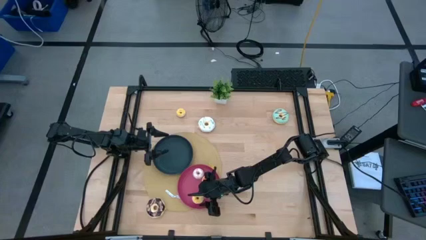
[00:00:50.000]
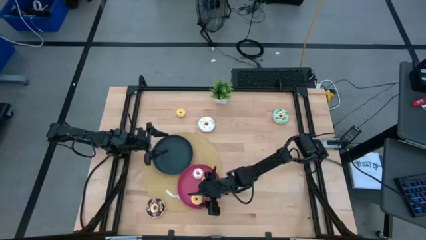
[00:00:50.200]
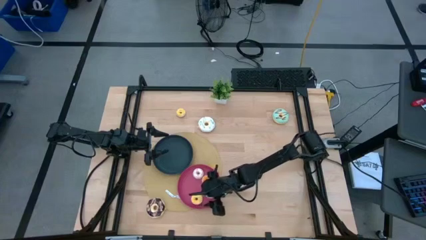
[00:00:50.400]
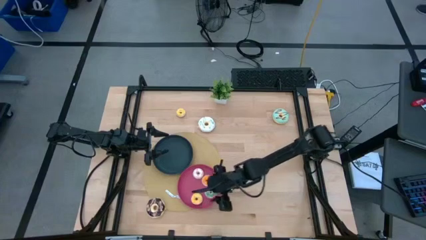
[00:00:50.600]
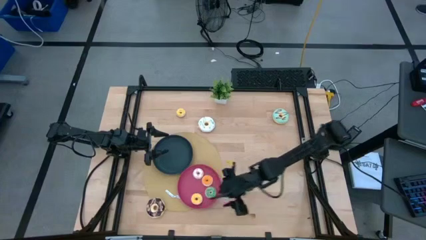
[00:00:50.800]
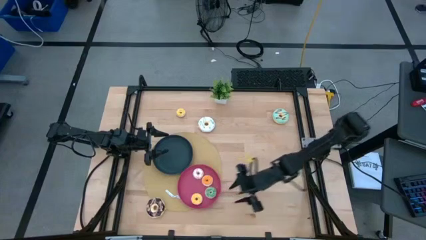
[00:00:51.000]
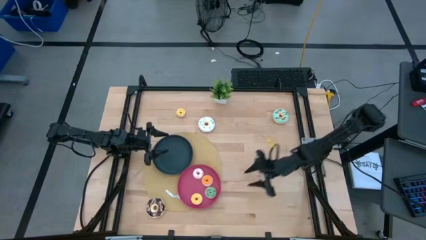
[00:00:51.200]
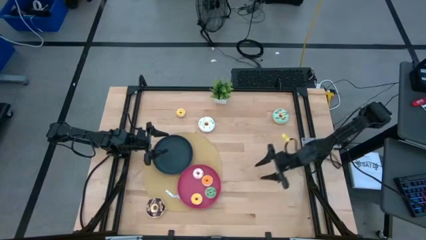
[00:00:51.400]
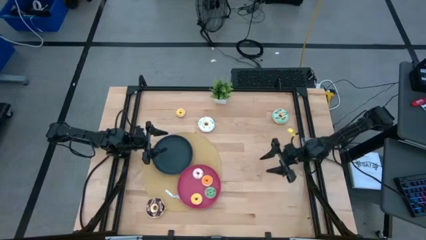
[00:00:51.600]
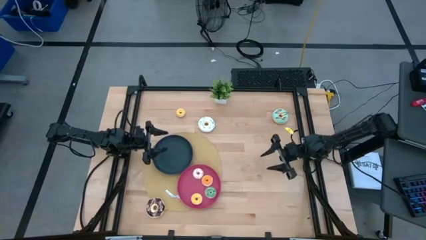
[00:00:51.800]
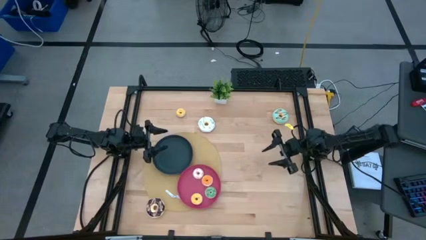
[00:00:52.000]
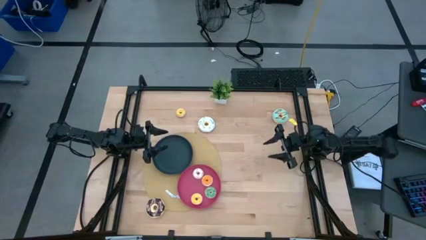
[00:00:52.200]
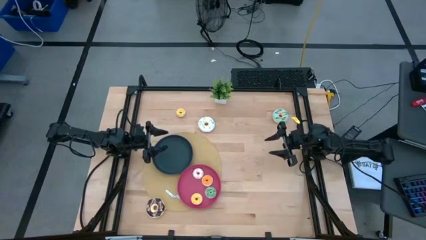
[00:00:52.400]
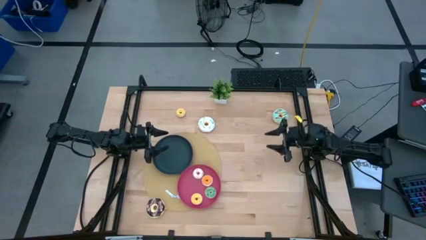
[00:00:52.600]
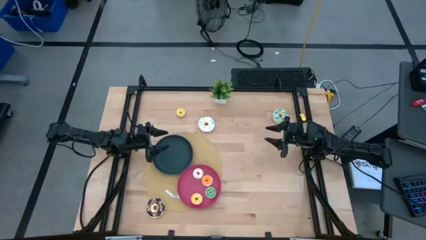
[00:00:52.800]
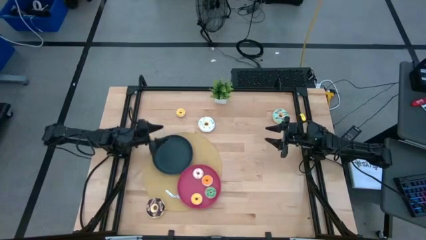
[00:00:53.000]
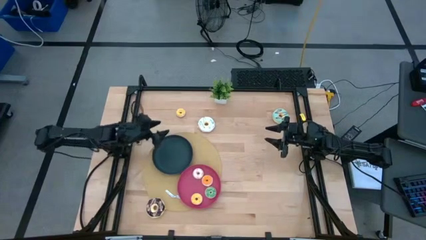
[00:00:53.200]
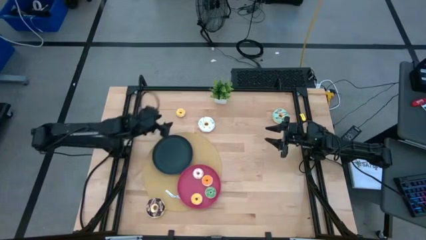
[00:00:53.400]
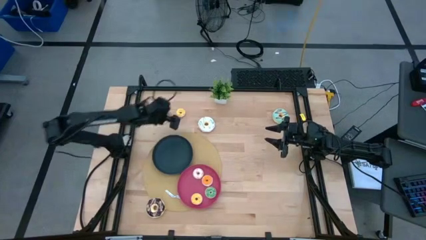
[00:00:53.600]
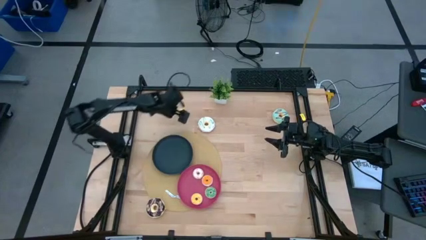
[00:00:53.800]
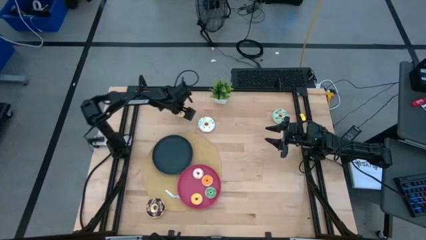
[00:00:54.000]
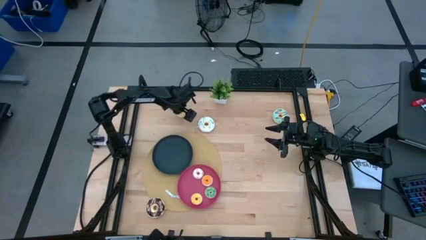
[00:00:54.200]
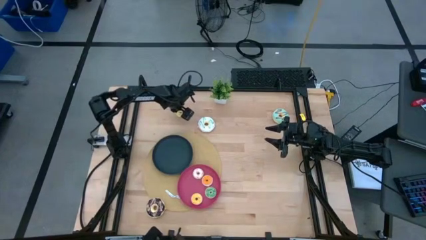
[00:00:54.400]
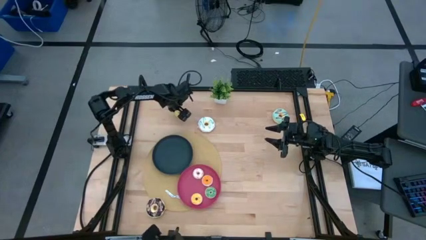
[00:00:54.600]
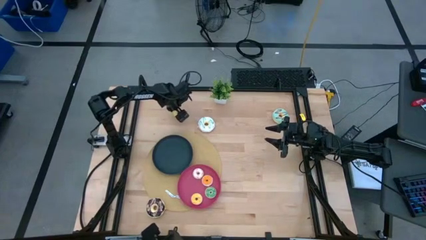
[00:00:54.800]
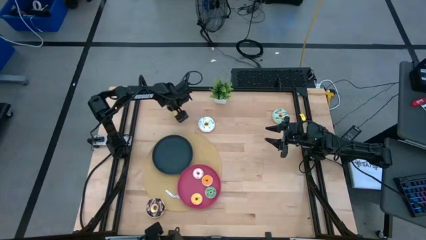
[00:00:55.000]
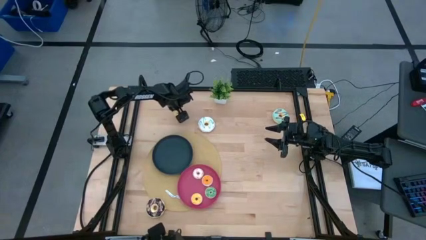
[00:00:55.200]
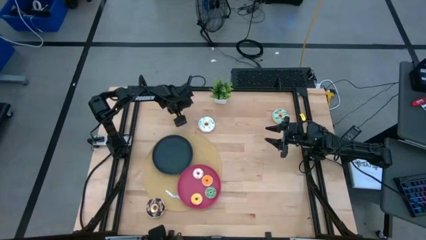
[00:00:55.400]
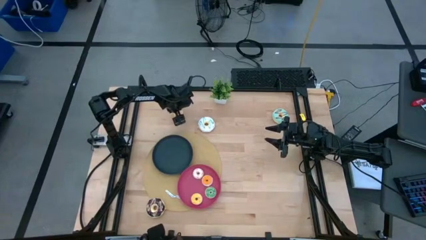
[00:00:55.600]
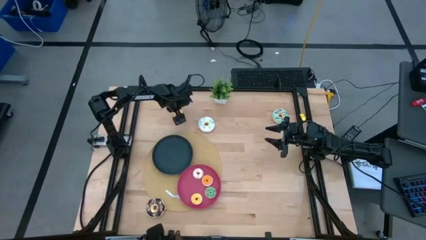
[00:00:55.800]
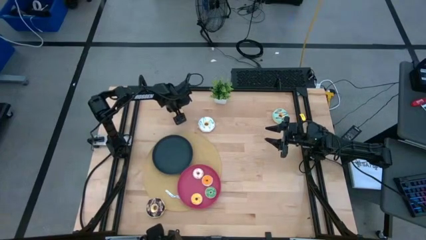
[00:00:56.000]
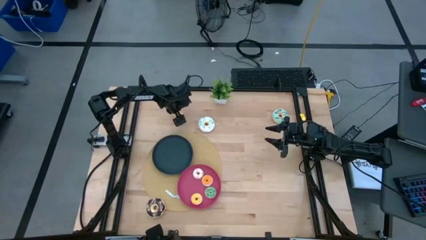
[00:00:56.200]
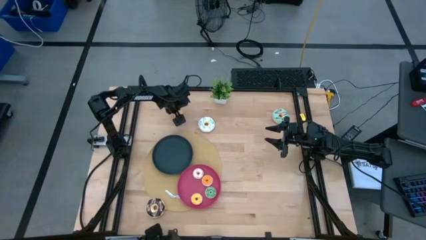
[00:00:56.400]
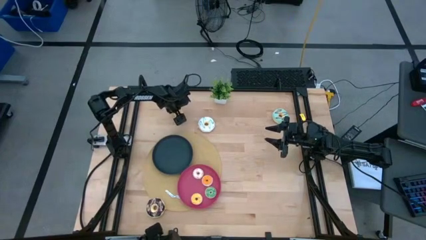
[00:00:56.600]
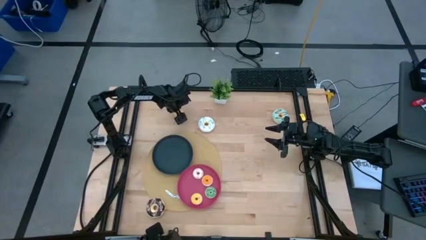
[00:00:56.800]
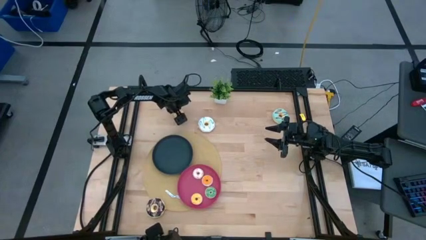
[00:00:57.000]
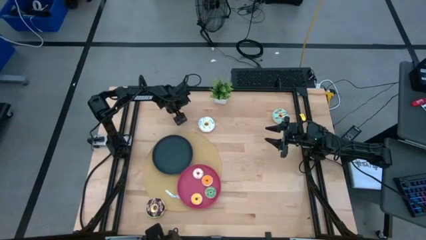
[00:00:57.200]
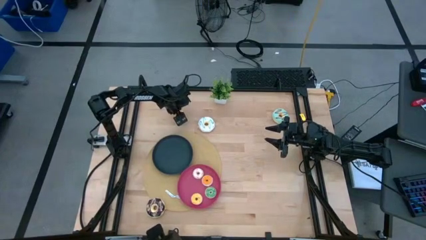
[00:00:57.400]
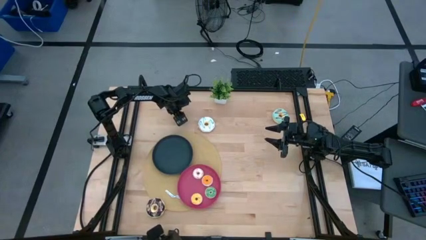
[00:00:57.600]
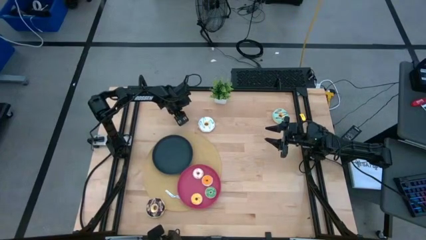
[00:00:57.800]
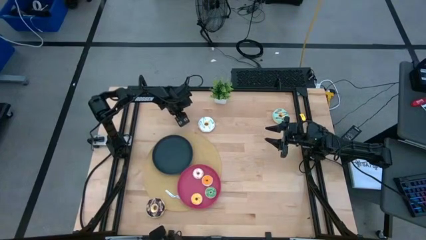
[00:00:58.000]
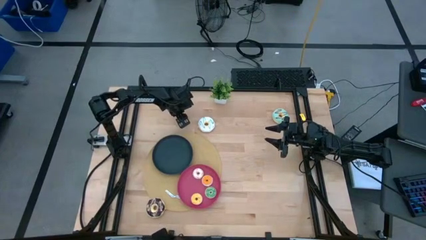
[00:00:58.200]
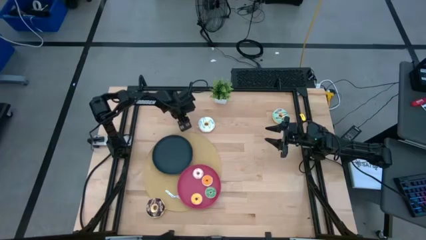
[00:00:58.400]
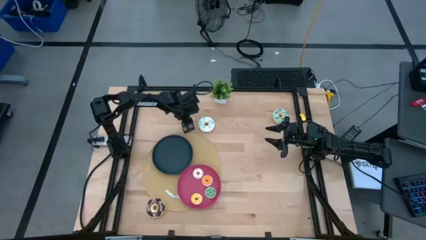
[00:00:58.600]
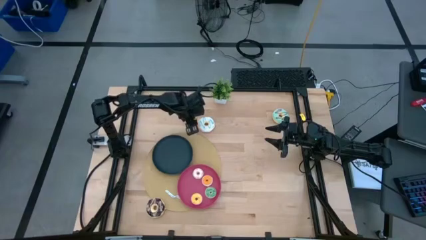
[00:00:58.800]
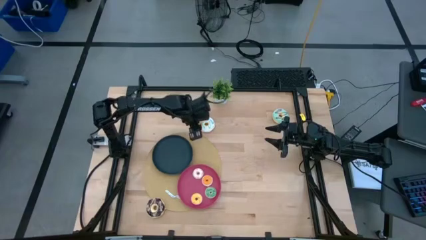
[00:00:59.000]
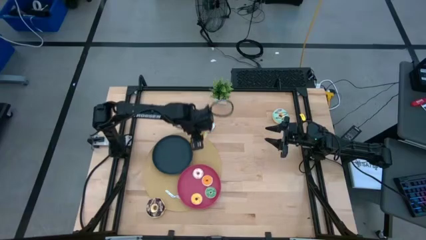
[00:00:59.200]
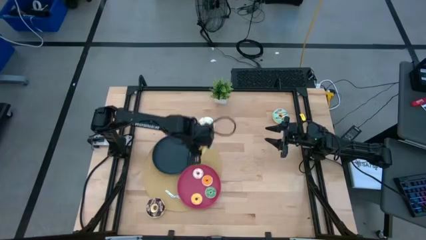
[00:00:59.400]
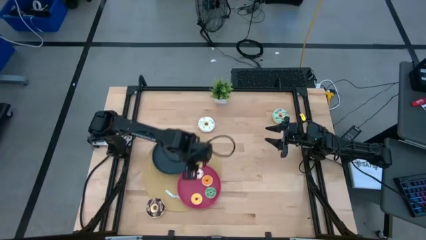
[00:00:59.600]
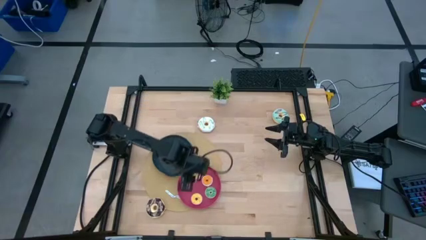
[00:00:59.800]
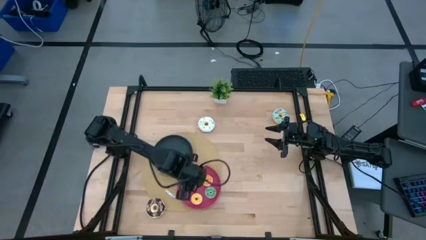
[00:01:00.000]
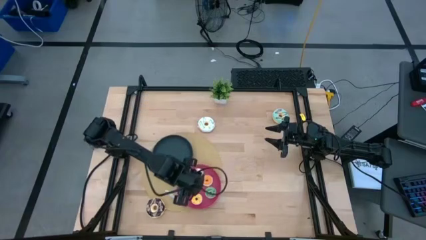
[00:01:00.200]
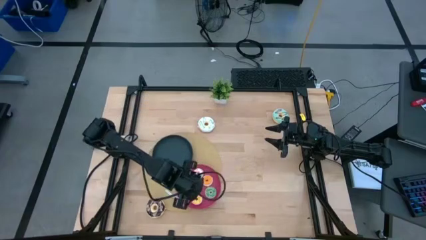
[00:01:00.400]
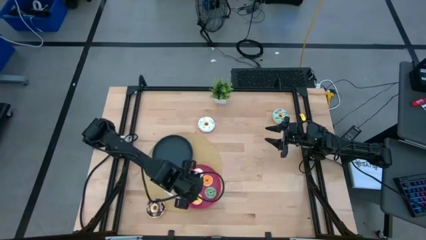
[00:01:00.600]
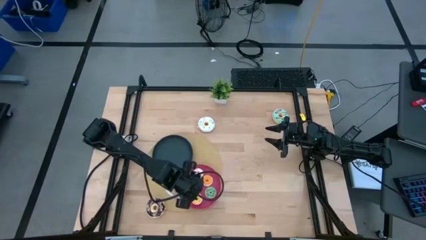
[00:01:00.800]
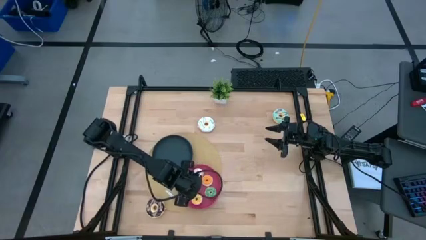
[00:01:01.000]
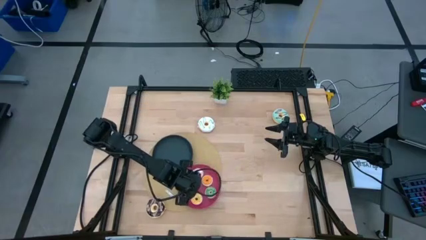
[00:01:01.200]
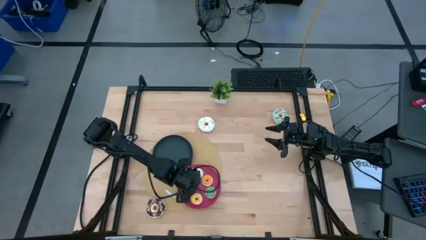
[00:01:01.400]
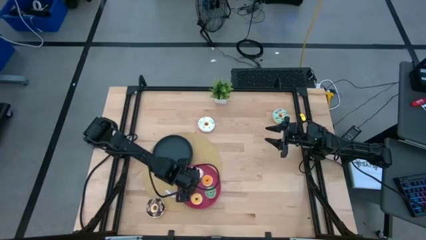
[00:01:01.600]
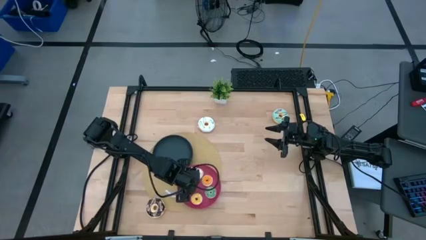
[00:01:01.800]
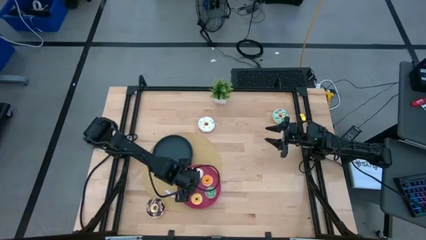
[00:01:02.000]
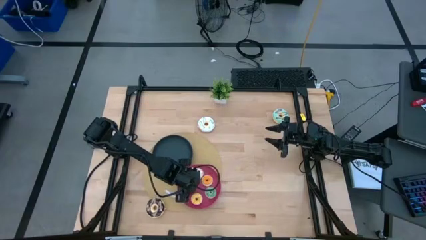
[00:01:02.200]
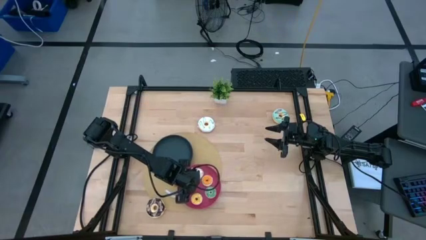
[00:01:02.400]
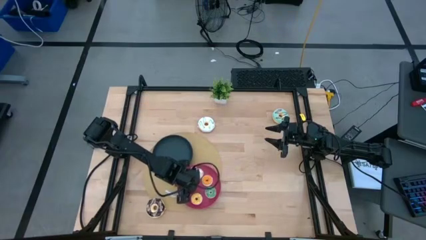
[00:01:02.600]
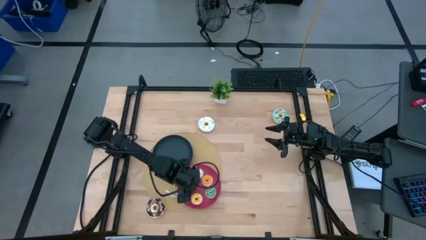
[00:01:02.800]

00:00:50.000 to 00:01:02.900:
Task: Pick & Place donuts
Put the small yellow donut into the pink plate
